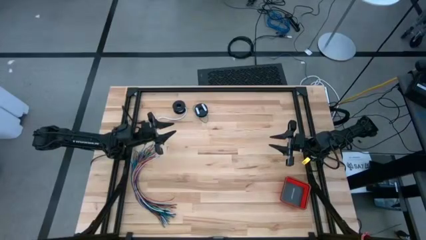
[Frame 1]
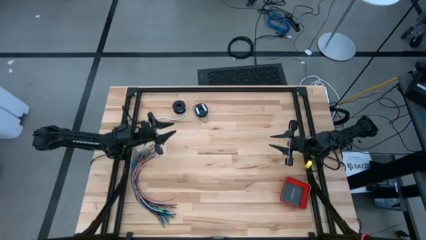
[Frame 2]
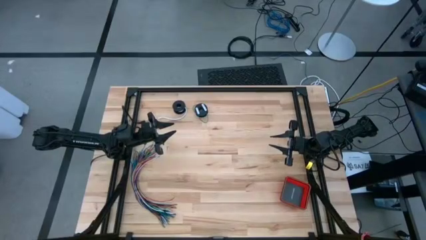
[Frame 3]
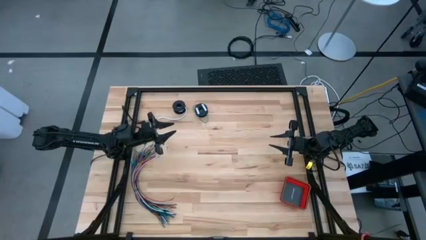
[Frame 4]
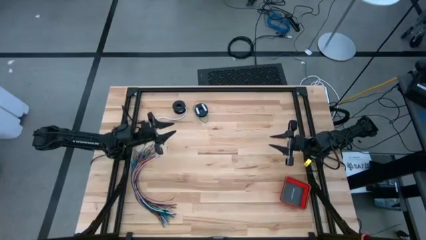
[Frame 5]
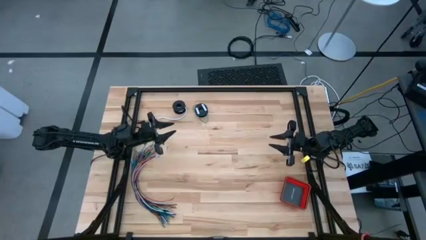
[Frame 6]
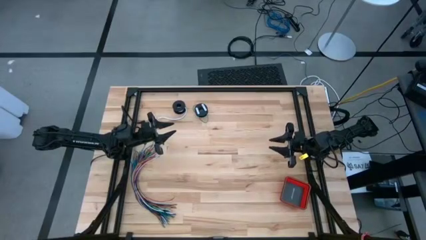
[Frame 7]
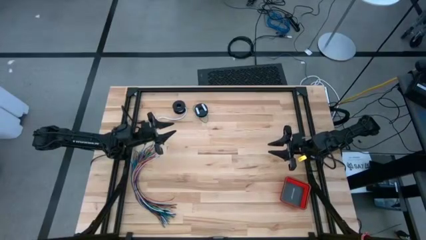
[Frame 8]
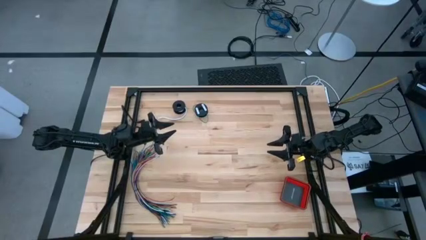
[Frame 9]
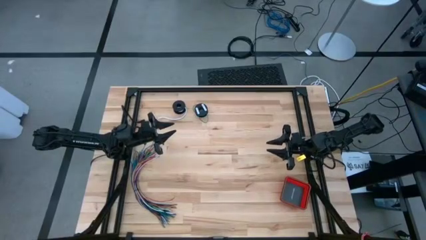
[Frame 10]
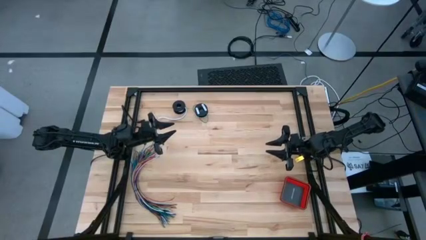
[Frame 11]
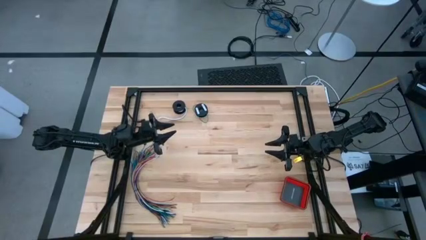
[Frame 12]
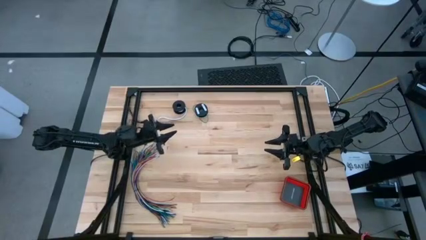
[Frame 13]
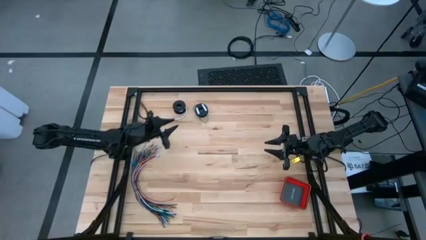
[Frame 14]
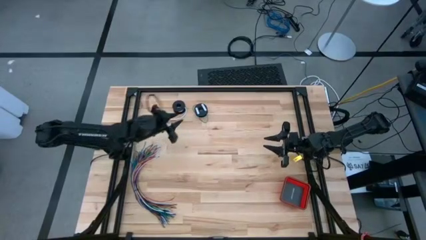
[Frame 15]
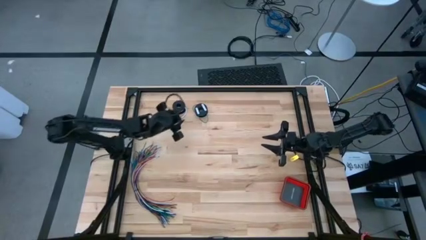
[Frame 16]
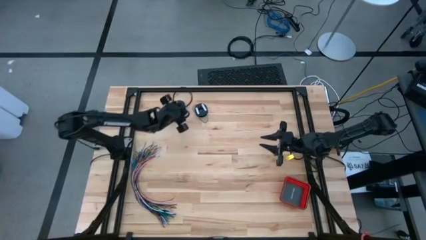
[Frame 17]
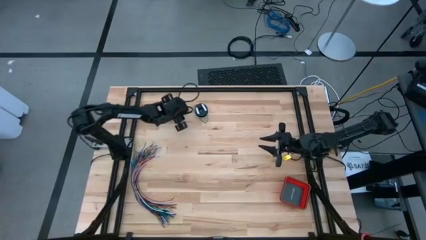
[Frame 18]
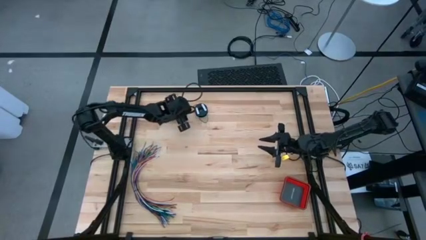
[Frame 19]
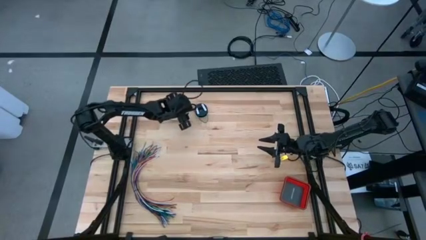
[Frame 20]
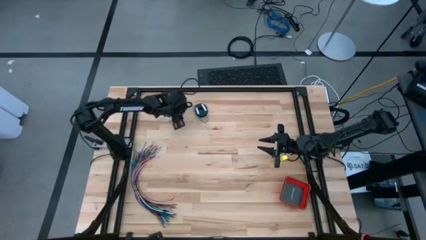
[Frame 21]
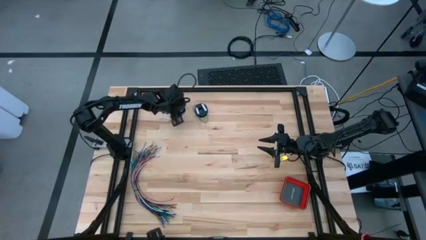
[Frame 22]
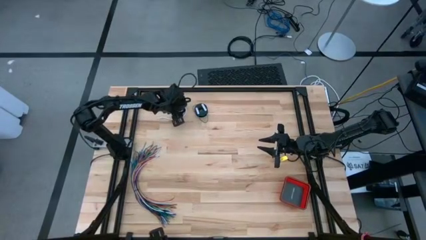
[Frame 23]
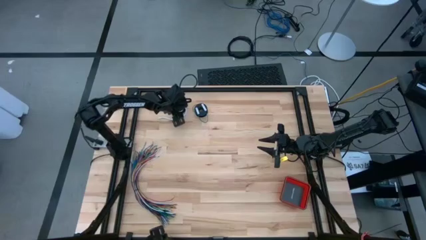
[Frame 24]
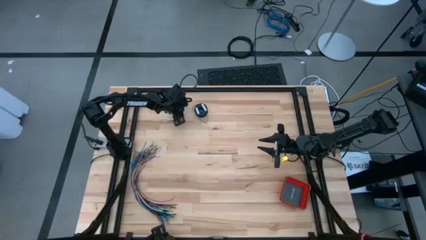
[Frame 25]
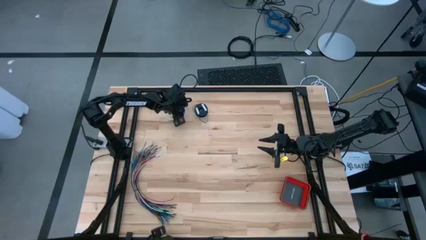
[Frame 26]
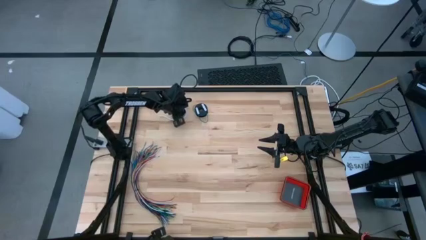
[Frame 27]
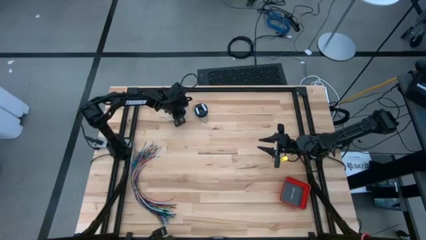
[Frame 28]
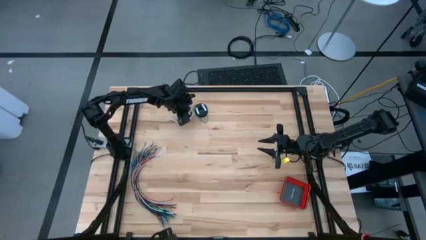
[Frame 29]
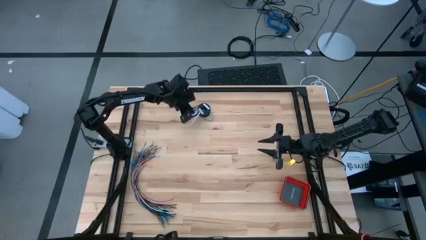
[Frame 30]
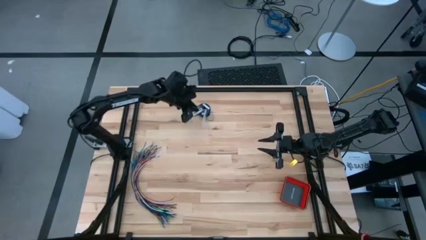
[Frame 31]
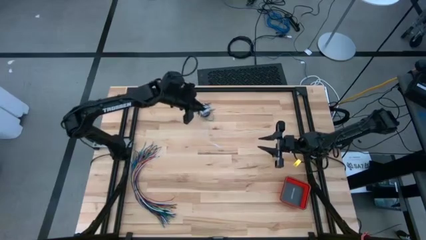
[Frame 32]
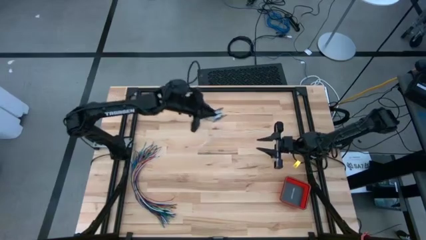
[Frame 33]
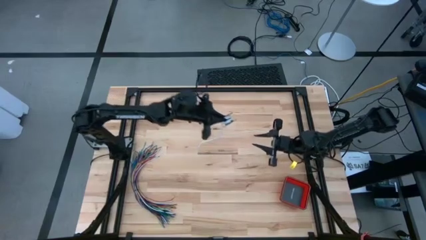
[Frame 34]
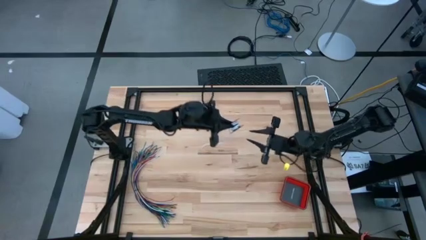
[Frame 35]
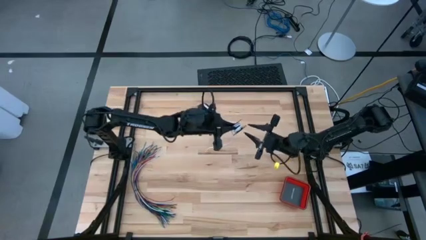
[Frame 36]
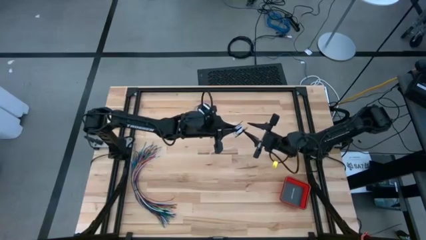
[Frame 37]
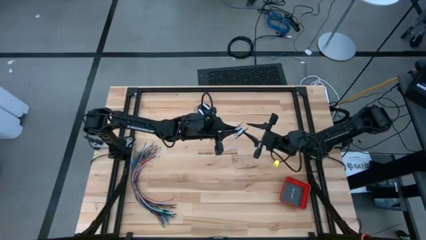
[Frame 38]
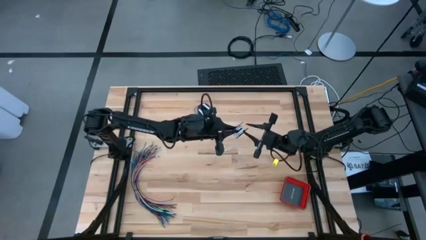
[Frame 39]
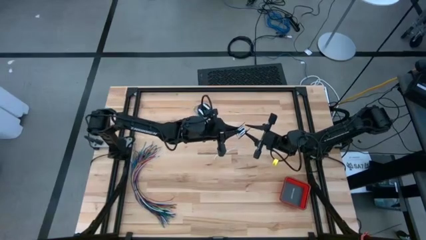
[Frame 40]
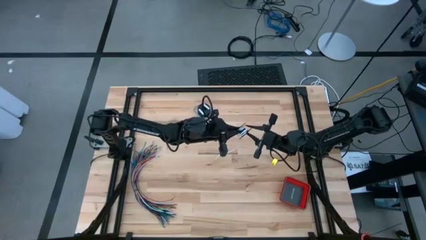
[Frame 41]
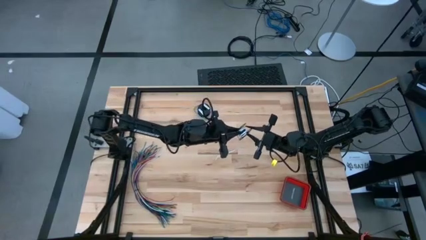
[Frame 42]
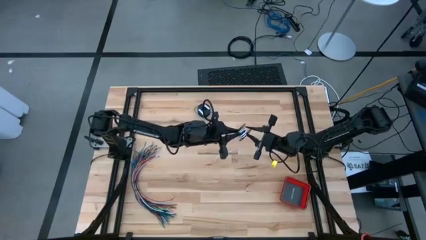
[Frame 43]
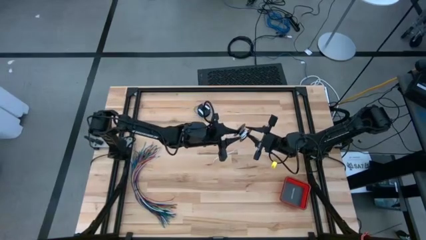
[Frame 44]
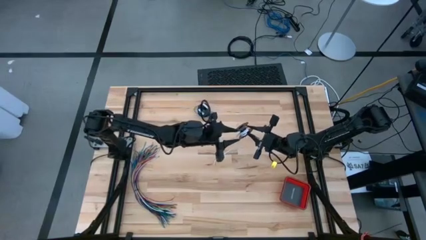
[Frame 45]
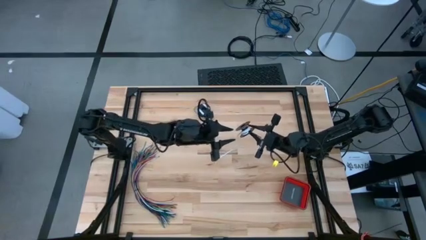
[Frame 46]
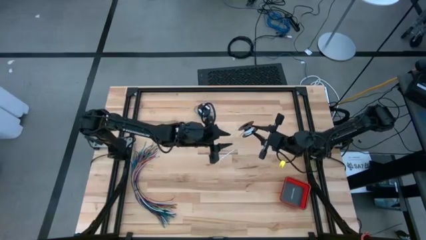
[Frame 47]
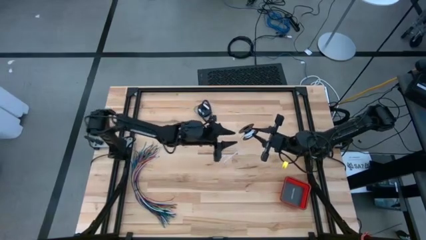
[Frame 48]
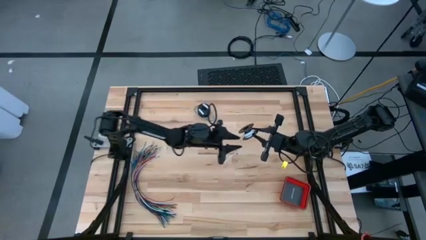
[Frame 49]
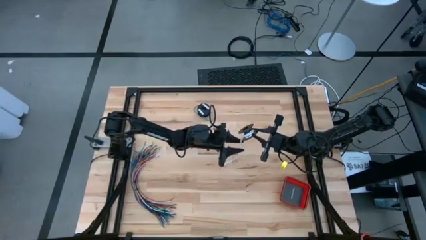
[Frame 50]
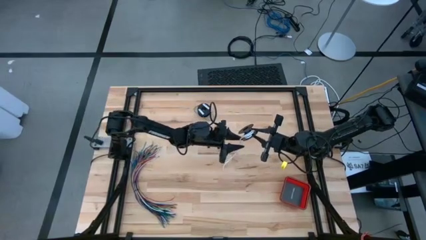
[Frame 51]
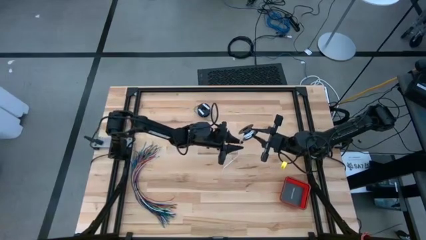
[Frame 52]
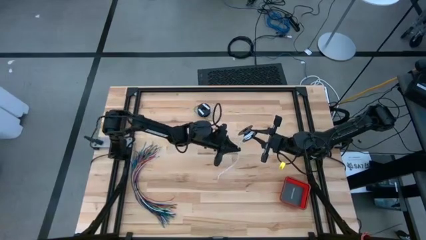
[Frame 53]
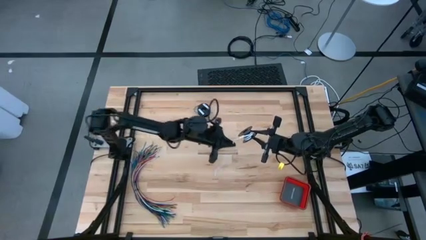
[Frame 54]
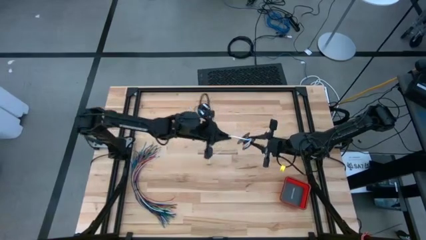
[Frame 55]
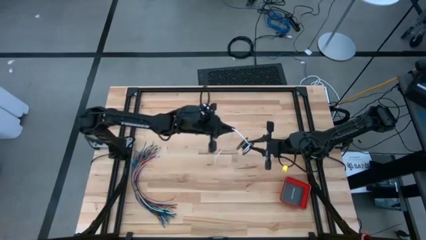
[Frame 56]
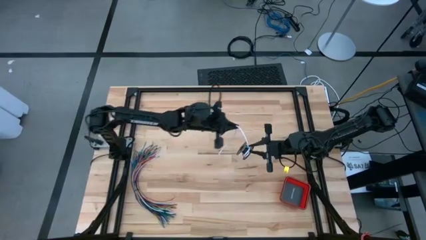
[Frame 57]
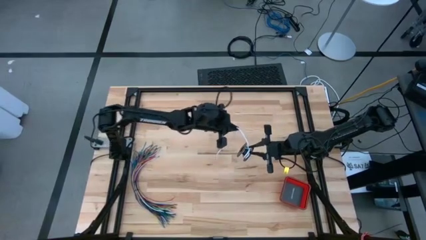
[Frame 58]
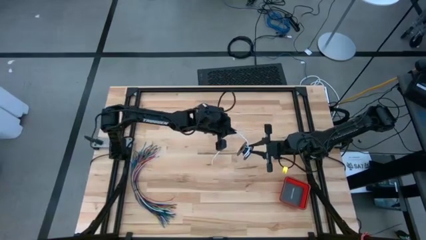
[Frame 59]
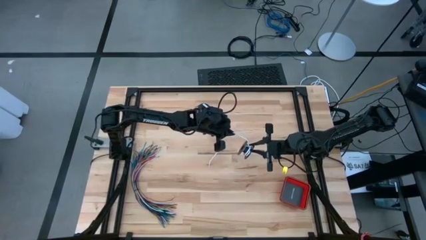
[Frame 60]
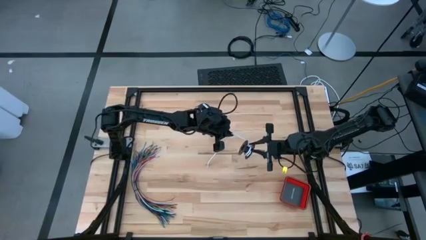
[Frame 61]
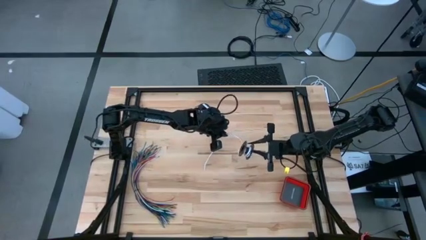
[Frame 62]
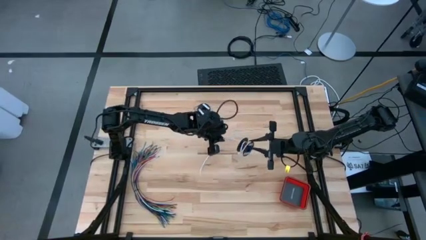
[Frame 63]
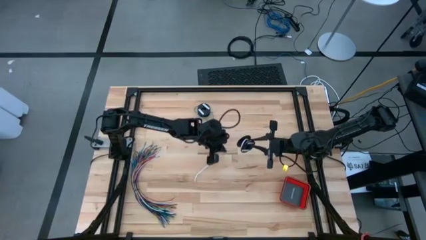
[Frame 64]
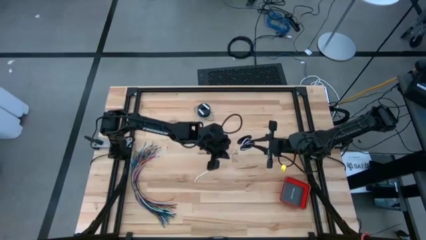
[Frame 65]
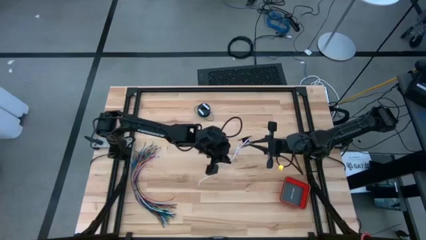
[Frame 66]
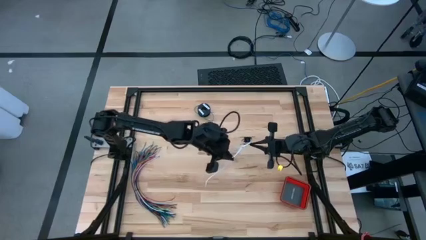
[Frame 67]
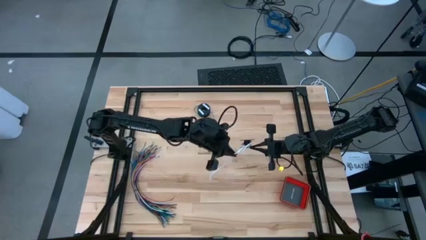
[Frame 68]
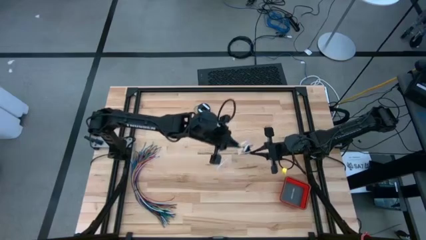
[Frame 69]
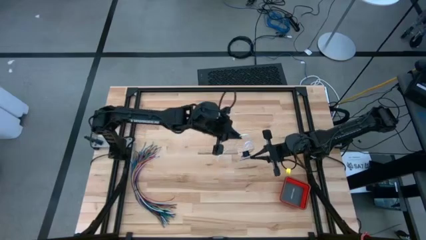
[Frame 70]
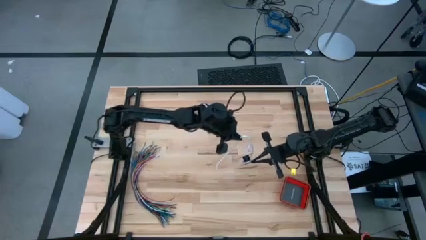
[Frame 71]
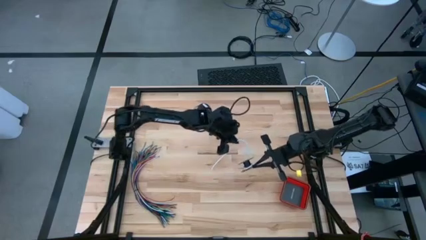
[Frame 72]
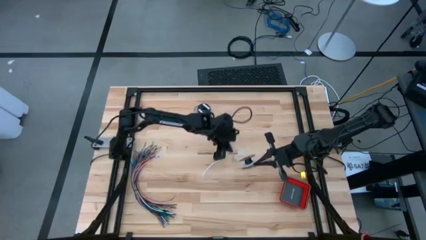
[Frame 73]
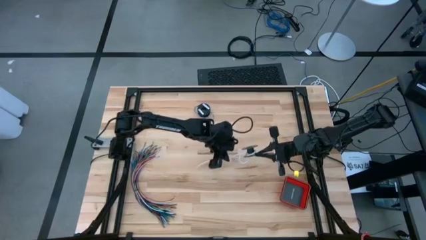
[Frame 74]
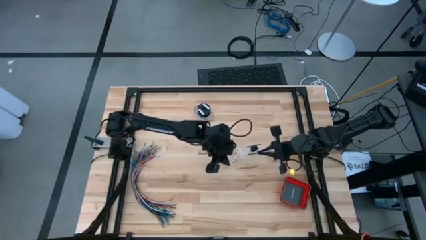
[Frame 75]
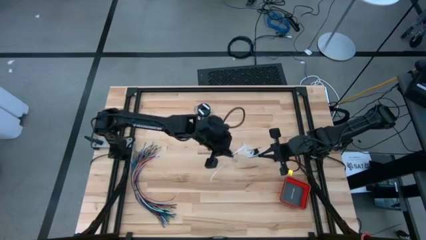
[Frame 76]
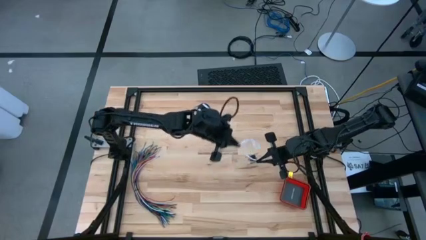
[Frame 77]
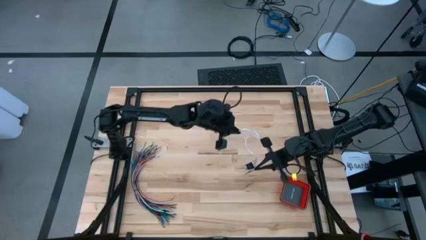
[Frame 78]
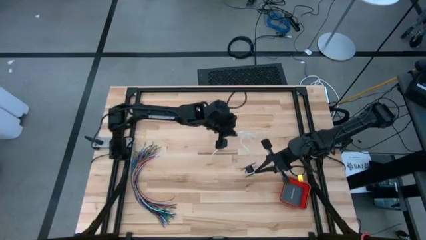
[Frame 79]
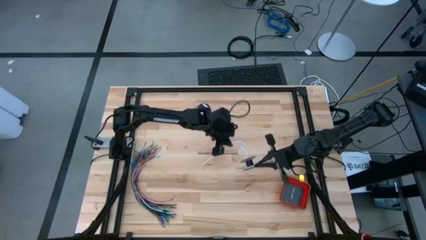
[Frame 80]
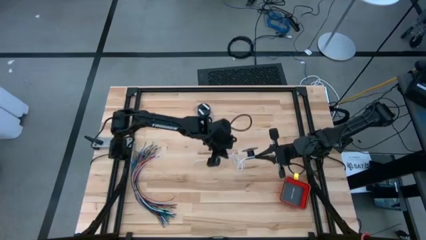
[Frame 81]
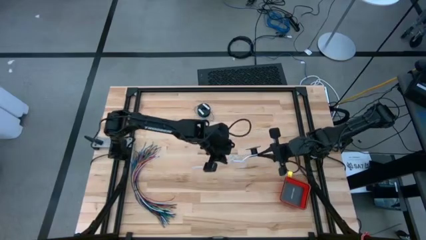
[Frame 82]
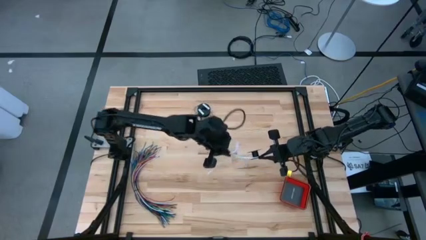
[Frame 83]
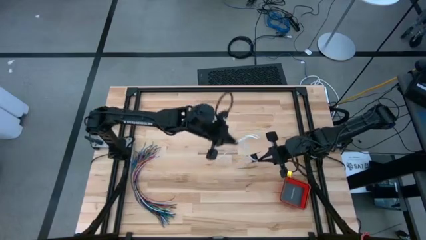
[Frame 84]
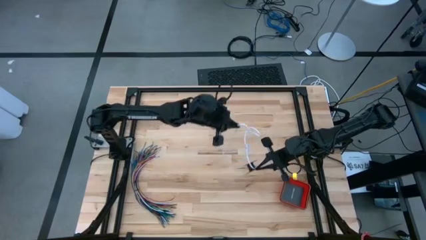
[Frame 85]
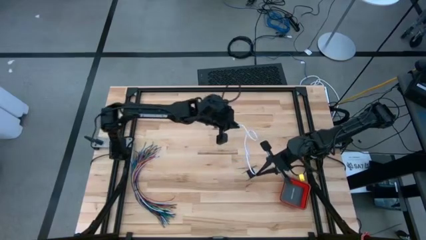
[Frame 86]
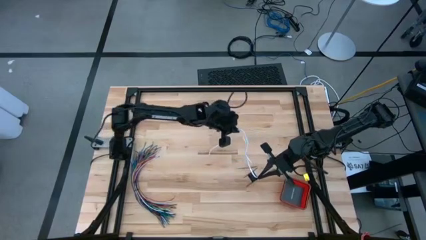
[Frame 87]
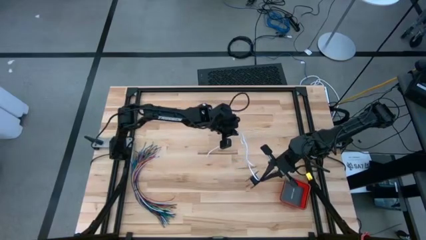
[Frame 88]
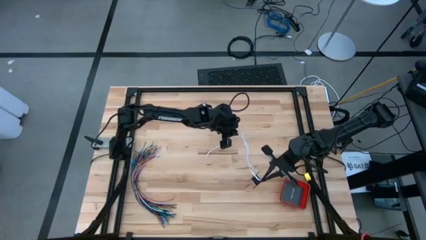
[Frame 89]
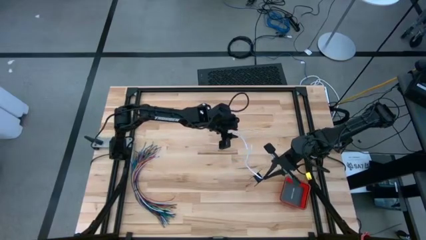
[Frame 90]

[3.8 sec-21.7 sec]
Task: Coil cords
Uncoil the white wire from the spool
